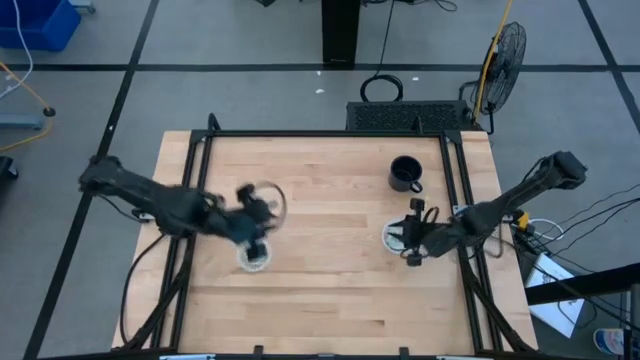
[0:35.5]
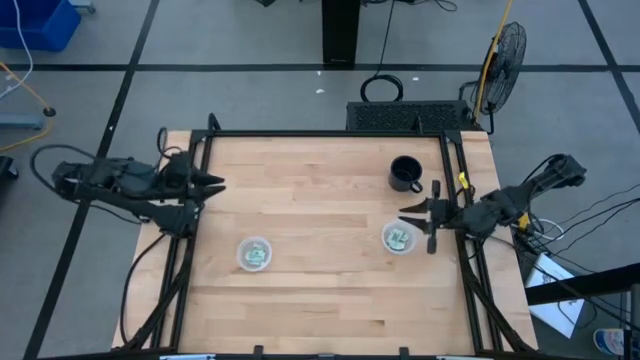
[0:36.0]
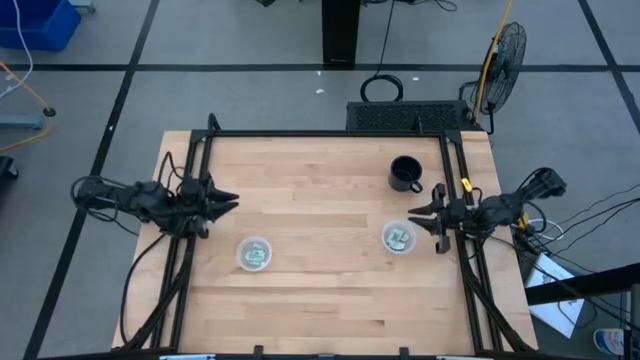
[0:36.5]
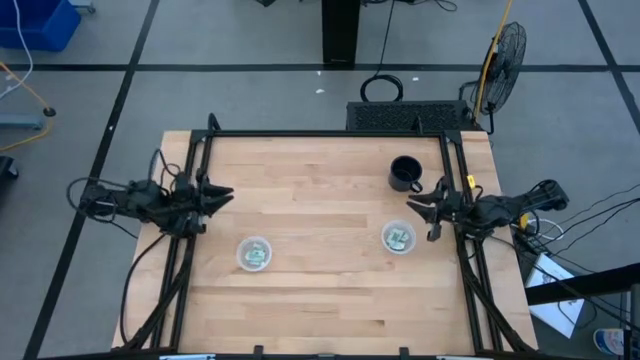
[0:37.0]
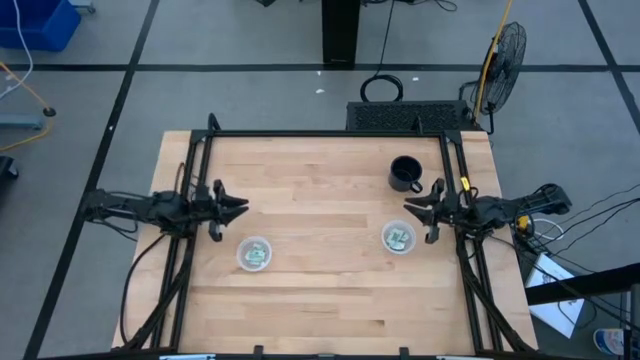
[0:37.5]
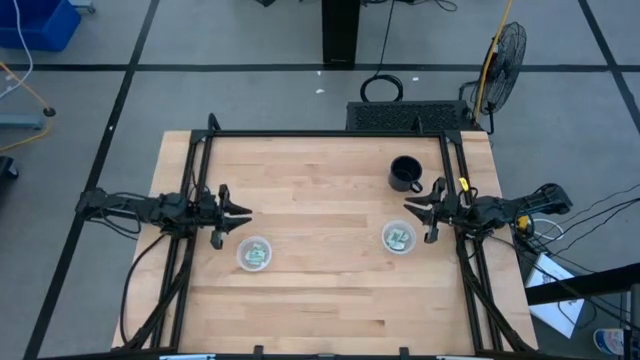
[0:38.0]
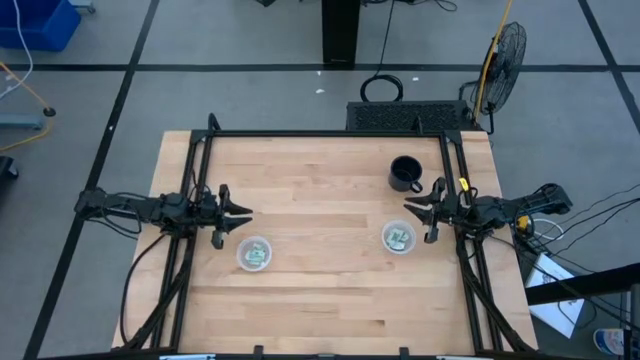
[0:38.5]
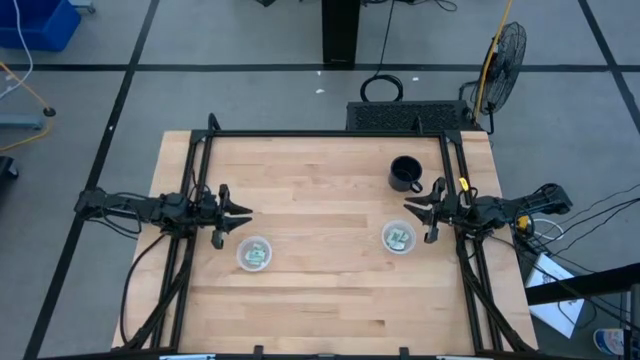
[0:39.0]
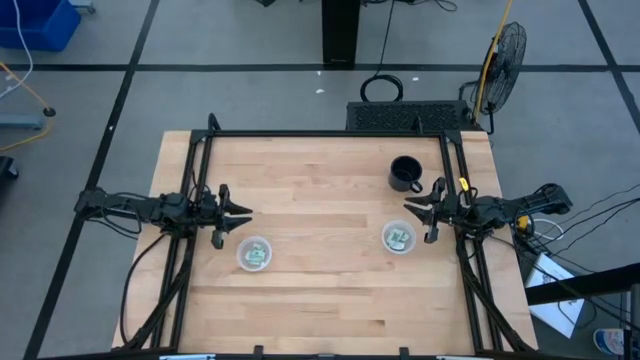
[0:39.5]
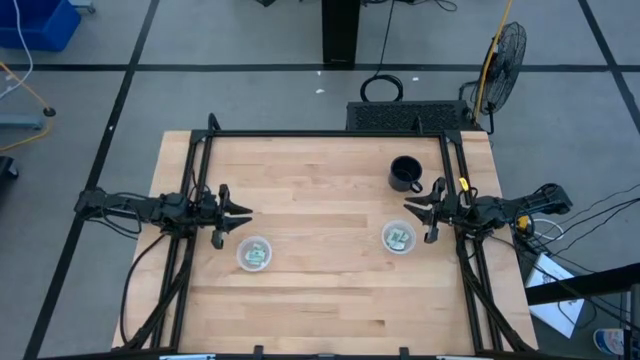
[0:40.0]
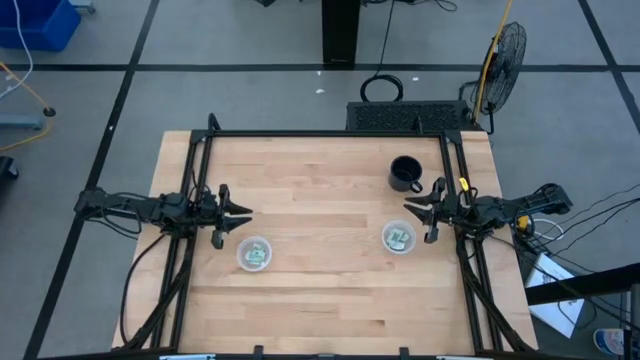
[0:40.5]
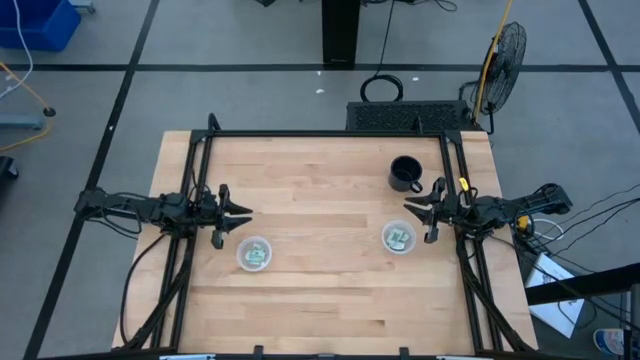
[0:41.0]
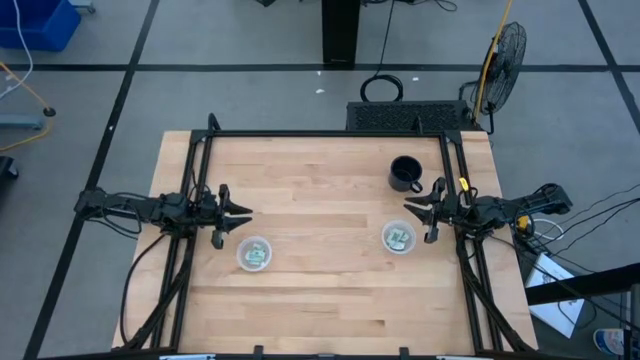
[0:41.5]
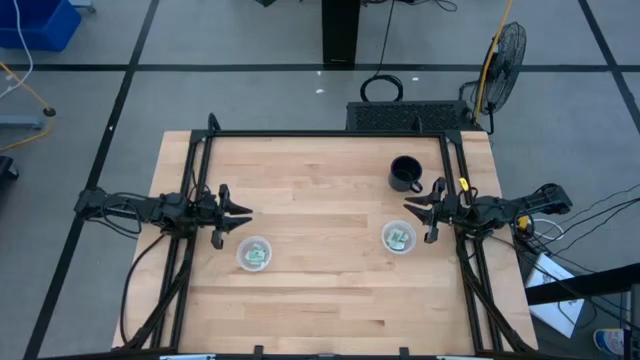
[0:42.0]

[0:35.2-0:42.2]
Task: Pick and place items into bin
Return to Home Position

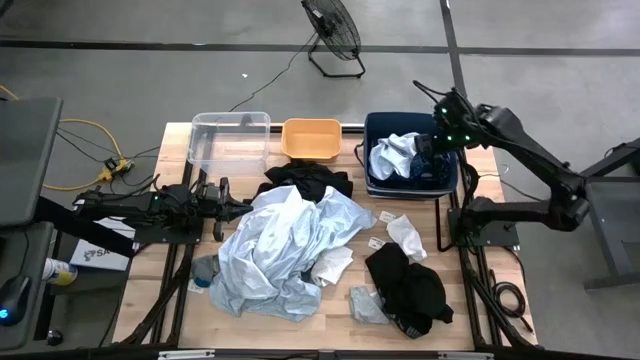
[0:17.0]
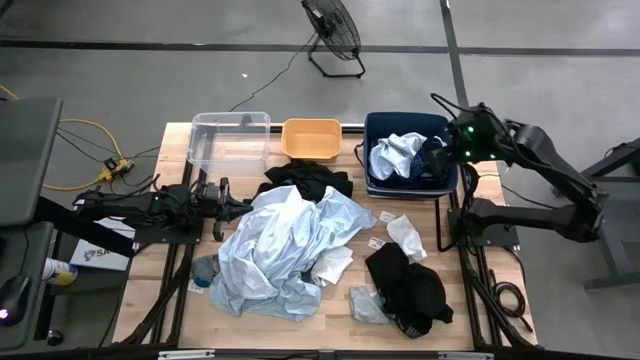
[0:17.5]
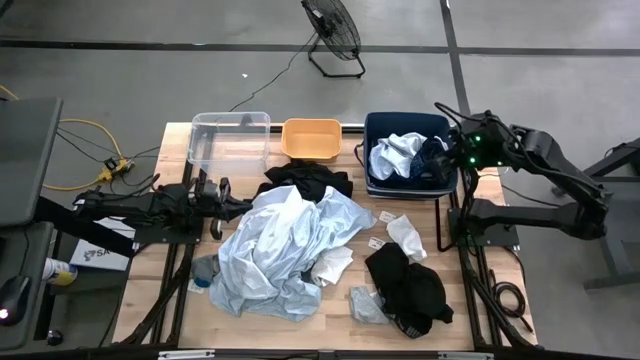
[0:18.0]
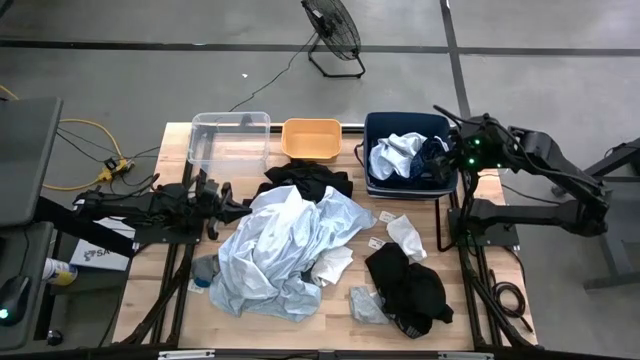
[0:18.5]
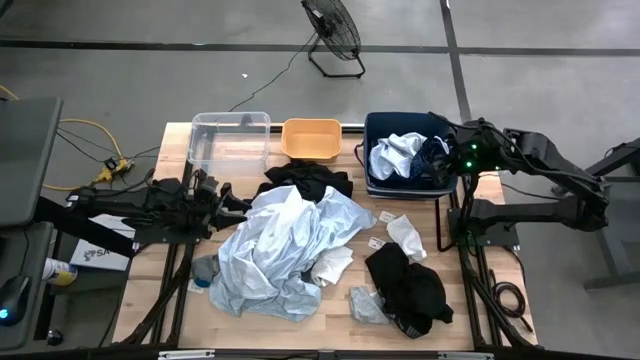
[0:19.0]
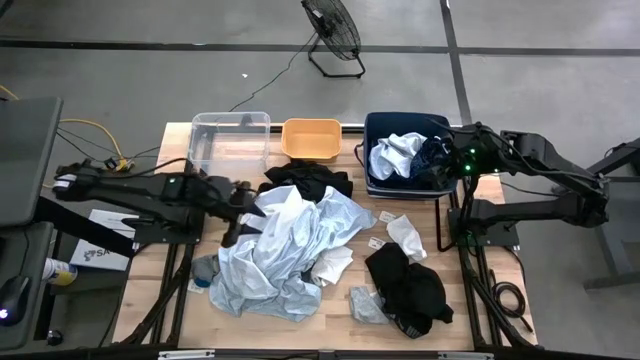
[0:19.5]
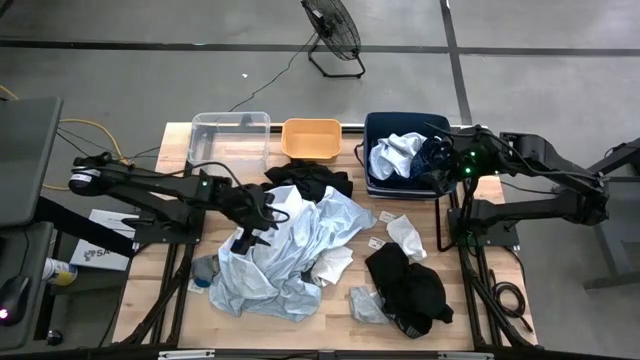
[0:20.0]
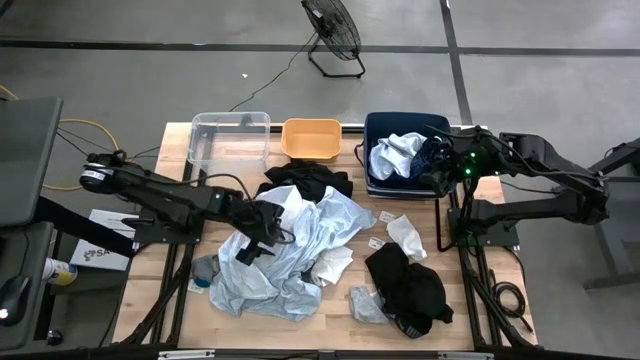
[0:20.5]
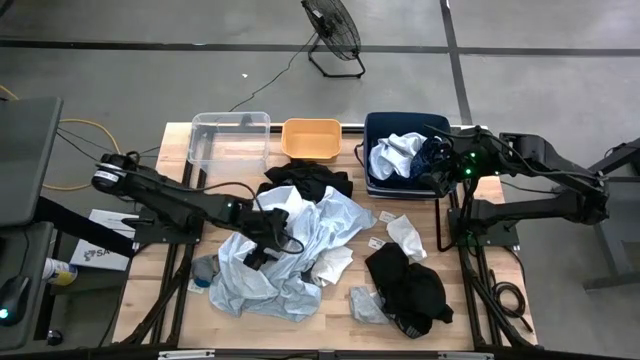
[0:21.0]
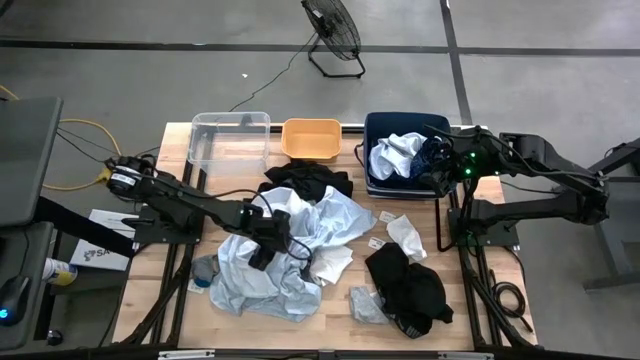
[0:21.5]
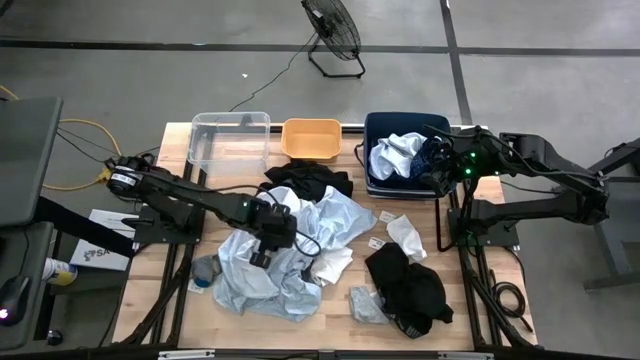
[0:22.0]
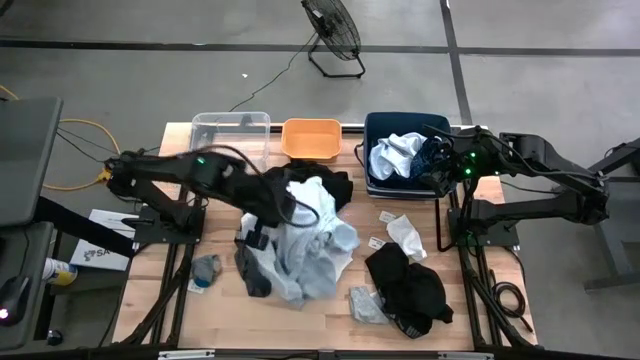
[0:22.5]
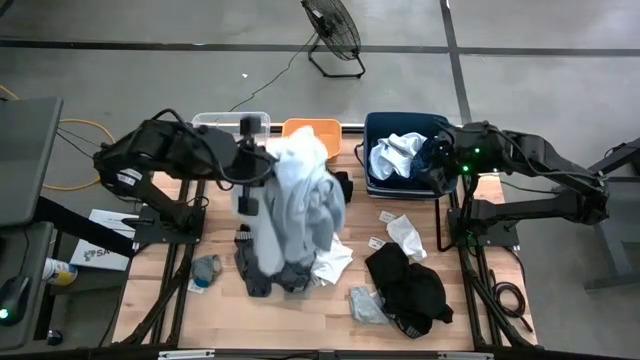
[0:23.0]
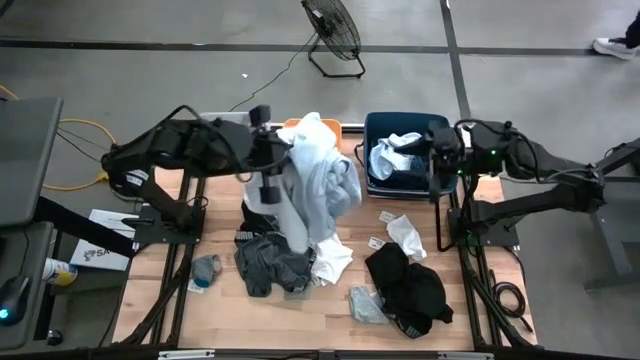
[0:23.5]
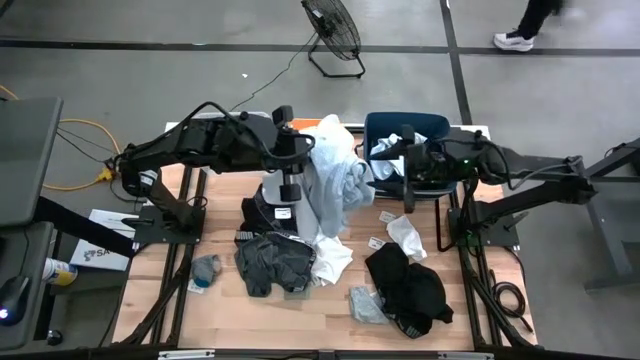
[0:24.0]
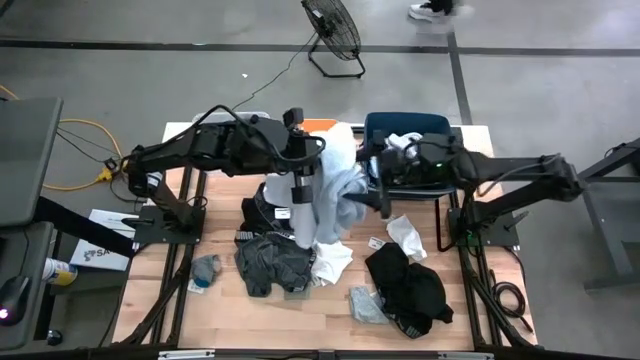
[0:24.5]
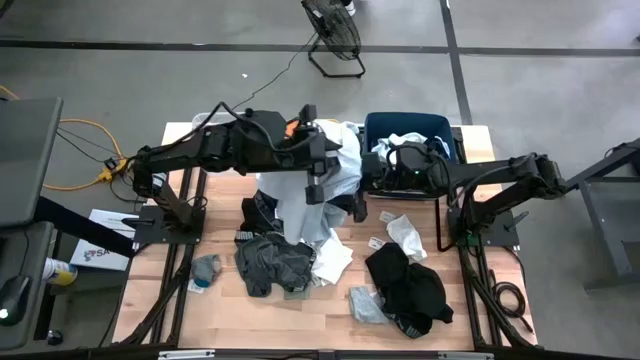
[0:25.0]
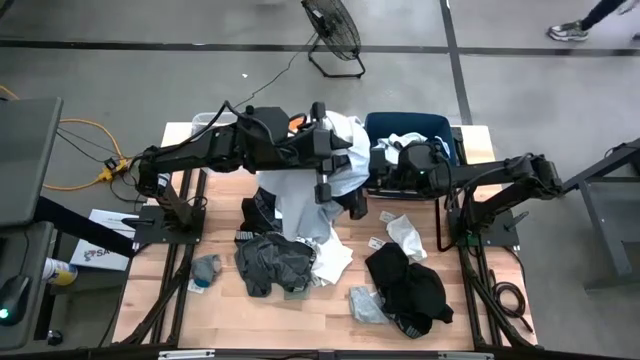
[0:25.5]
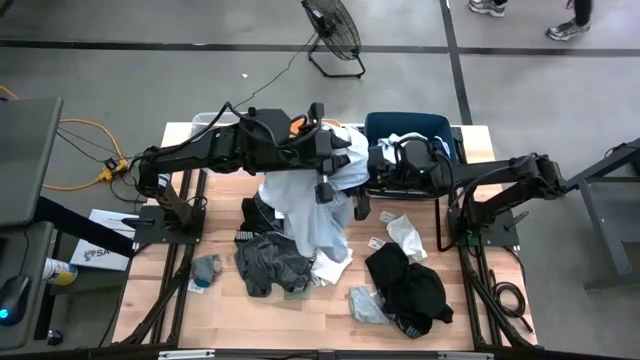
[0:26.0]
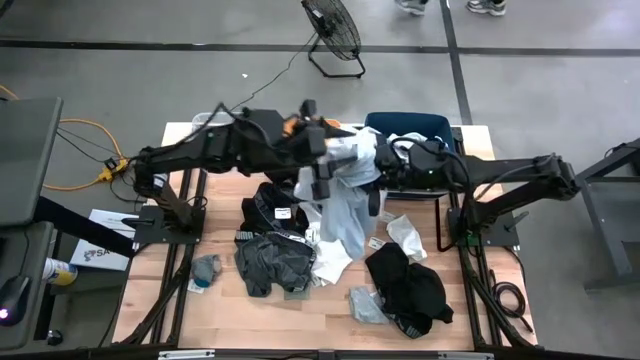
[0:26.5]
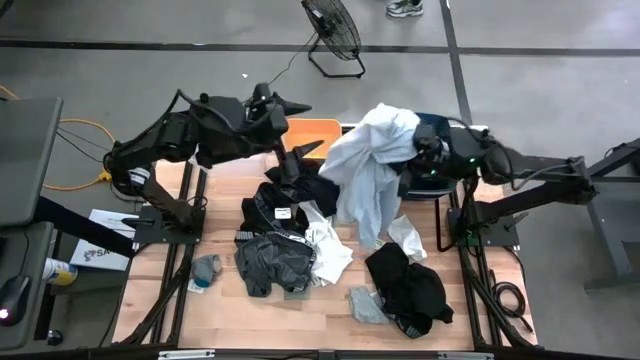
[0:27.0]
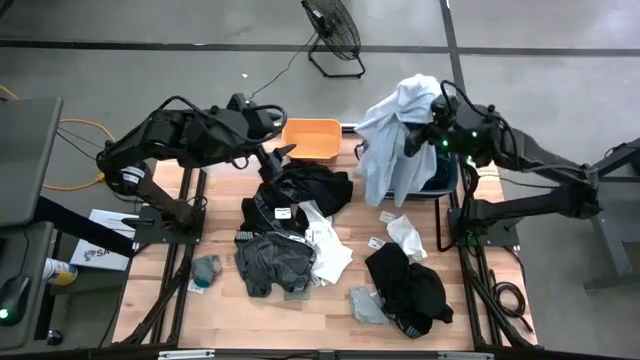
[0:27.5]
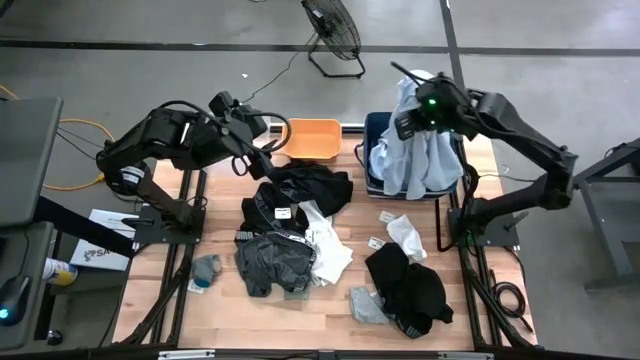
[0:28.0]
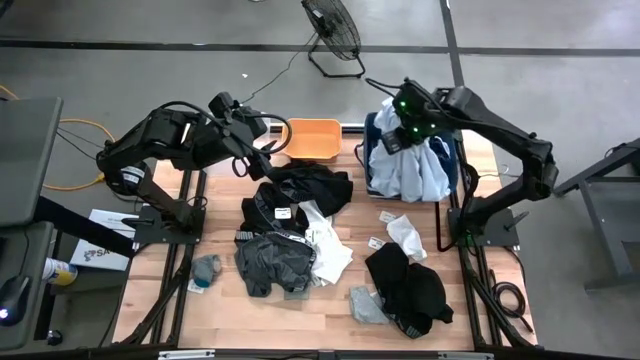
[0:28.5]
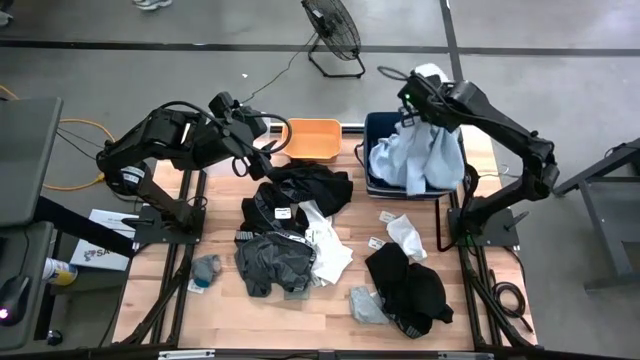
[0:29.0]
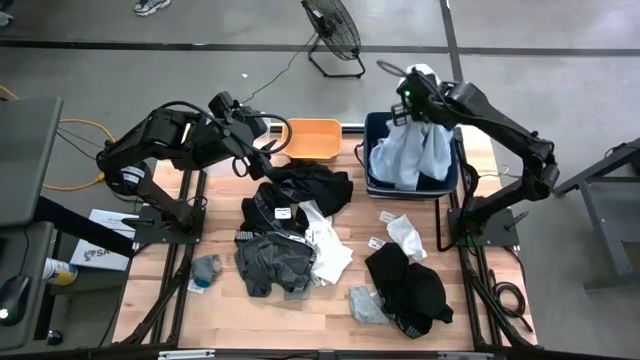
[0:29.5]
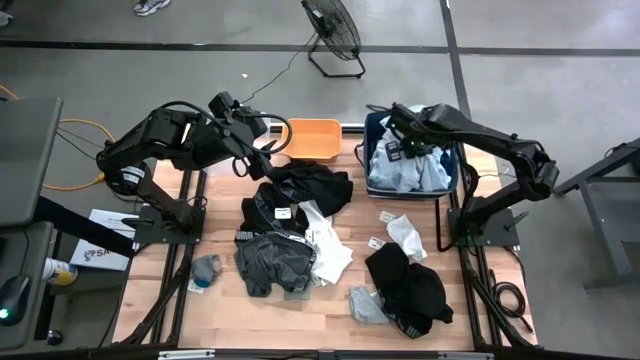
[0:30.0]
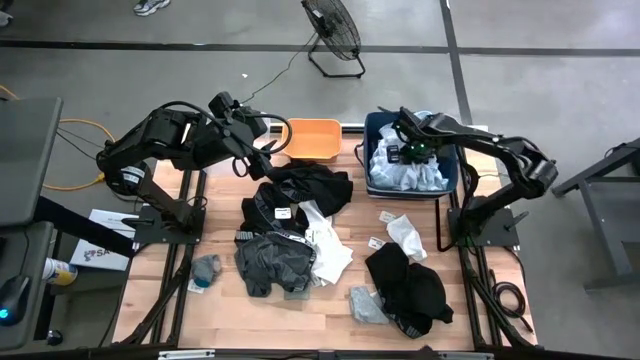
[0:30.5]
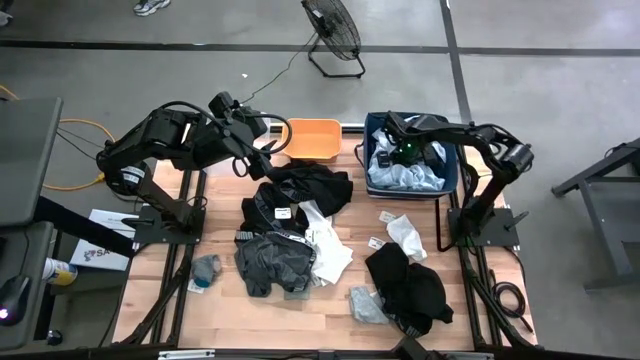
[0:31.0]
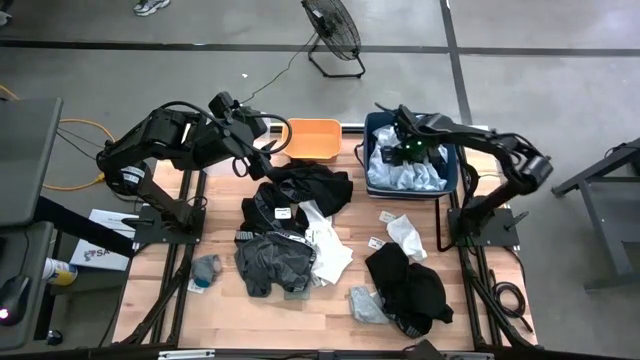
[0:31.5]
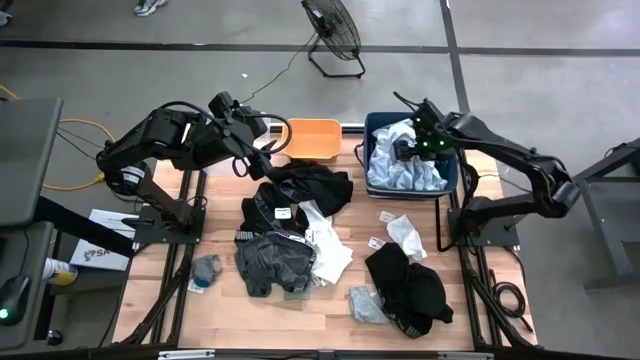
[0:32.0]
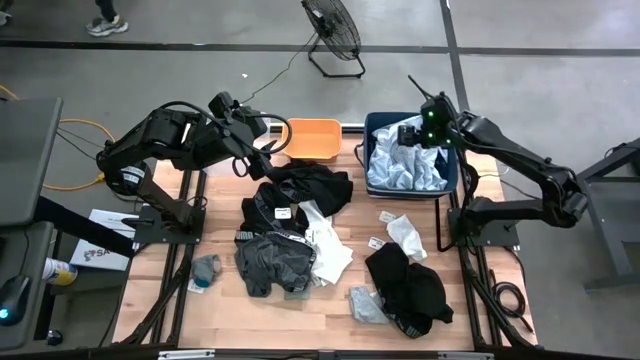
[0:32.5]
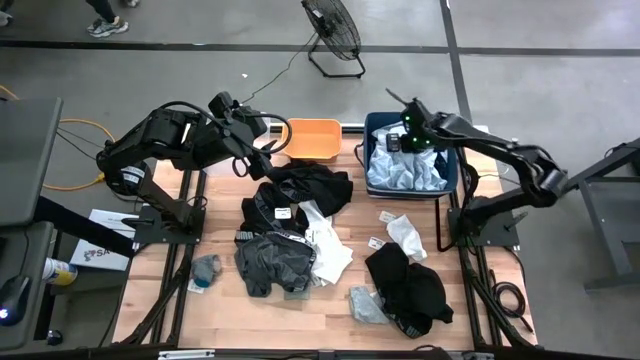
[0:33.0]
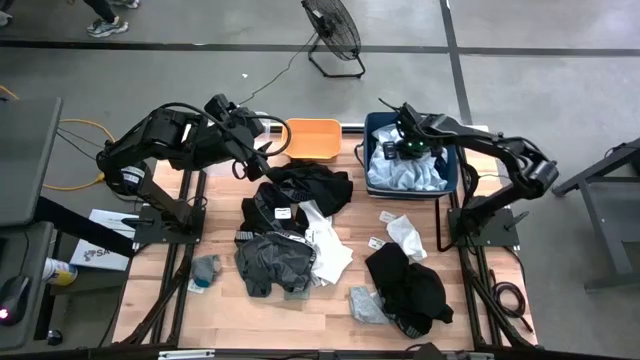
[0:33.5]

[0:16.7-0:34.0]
Task: Pick & Place Cloths
Put the white dress into the blue bin
